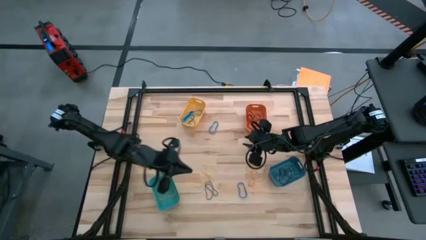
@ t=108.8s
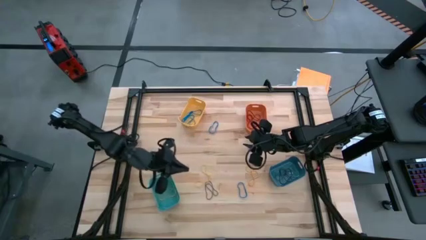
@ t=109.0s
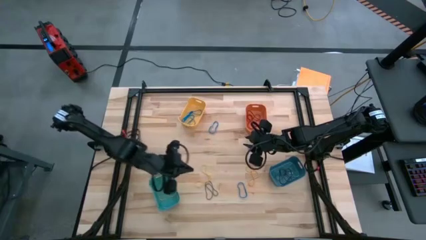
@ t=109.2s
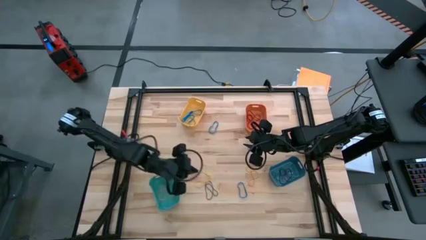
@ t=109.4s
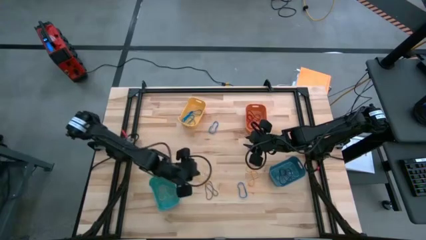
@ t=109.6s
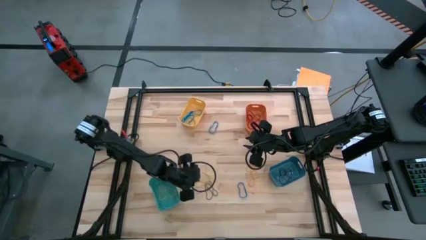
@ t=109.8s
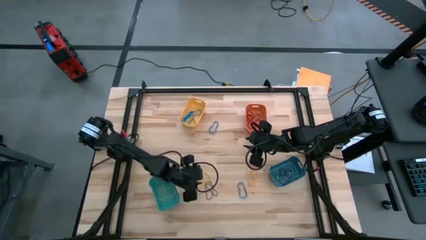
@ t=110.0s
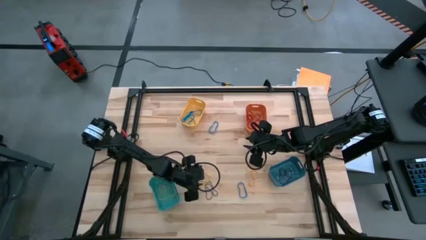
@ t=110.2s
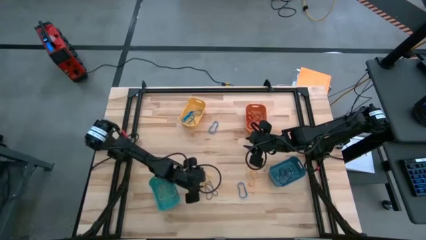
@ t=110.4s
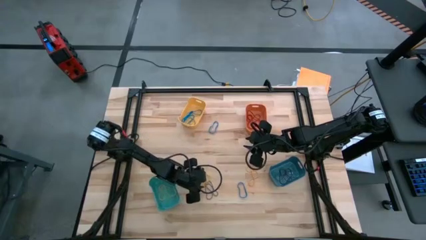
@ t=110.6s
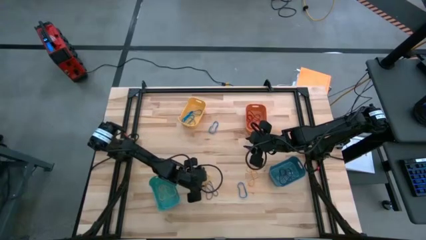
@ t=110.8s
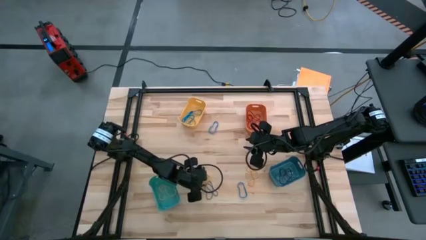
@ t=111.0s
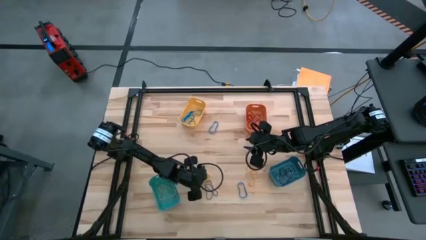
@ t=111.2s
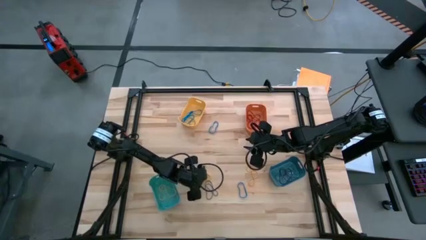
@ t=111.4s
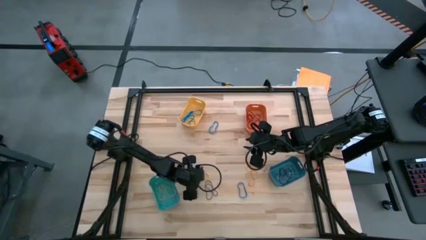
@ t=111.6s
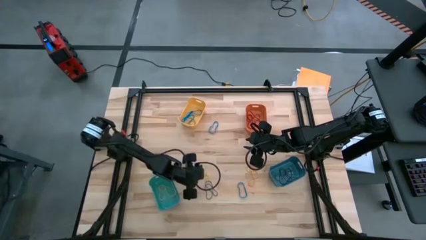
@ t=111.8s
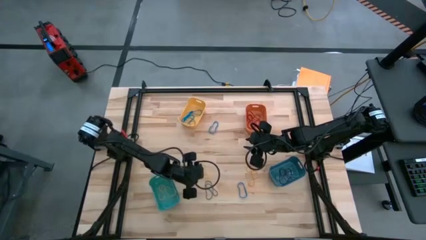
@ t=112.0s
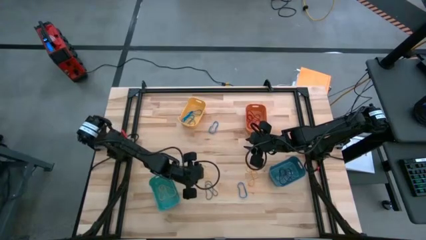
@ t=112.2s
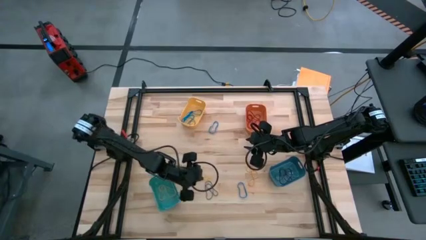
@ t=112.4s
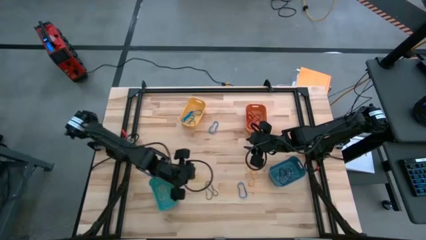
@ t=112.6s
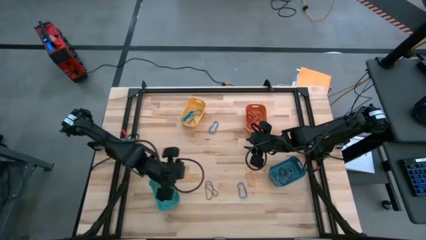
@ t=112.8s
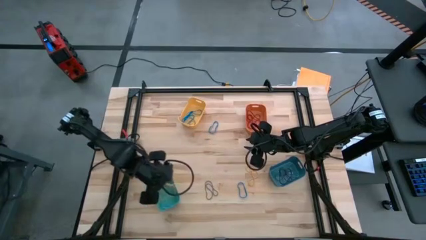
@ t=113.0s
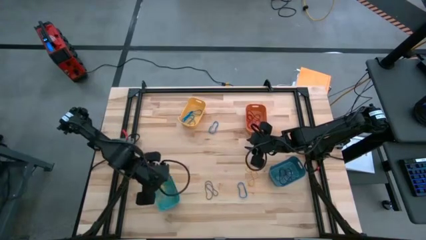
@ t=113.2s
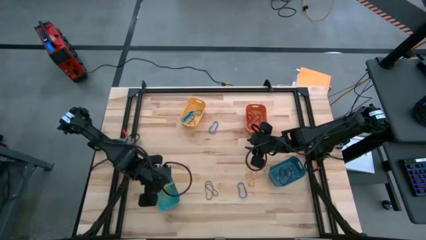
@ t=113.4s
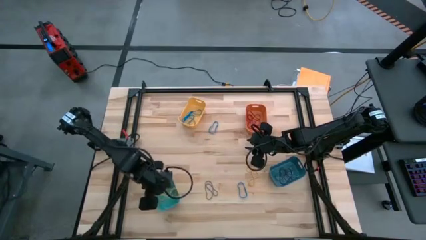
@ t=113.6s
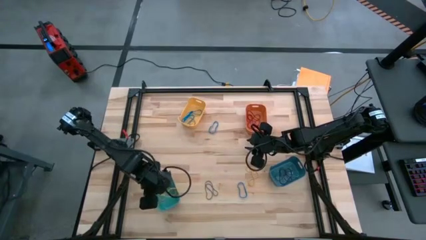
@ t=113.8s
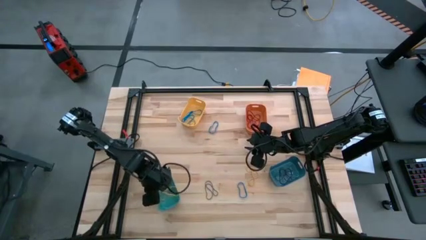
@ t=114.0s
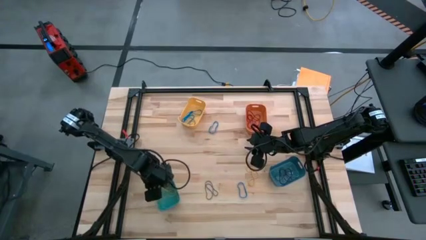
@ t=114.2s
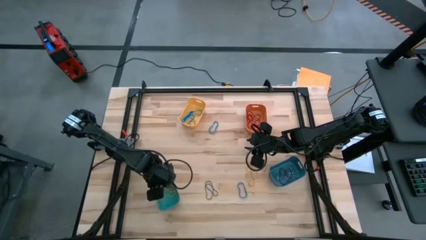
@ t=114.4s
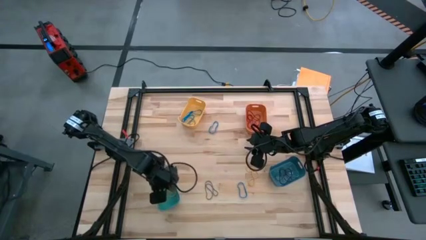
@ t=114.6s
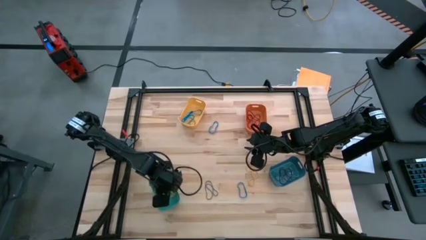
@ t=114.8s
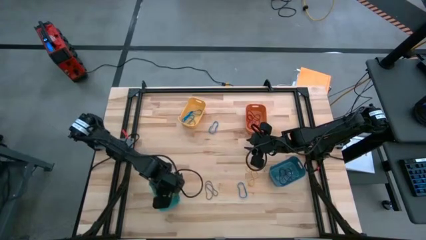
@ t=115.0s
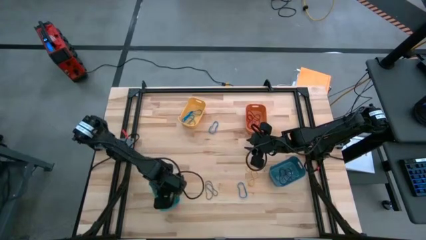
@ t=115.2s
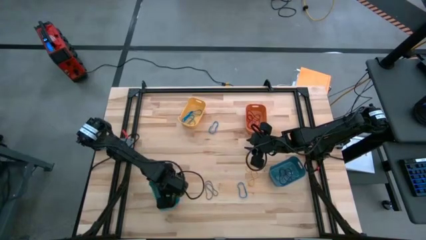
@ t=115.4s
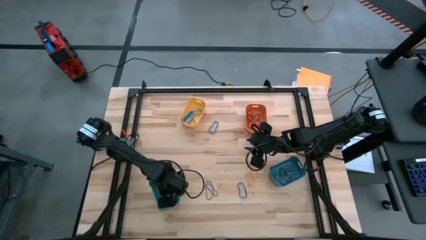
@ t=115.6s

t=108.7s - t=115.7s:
Task: Sort rubber bands into baskets
Put the yellow rubber band into the green bin

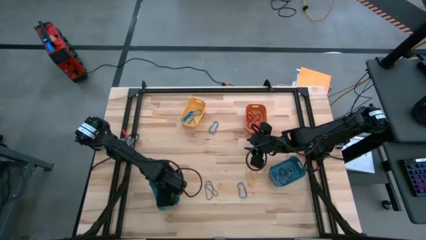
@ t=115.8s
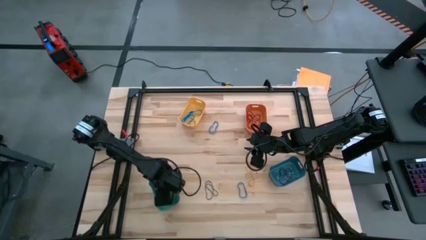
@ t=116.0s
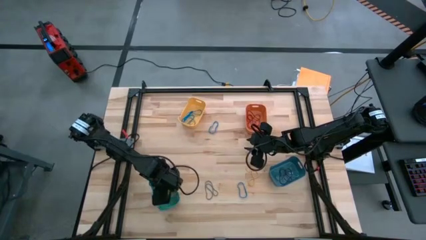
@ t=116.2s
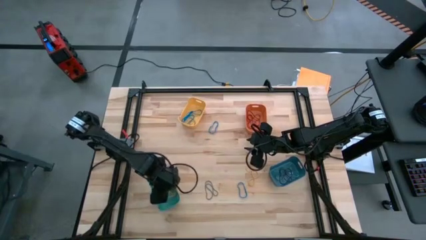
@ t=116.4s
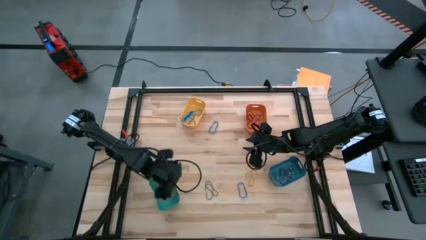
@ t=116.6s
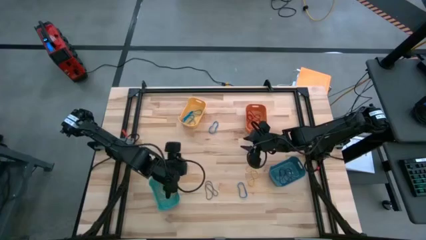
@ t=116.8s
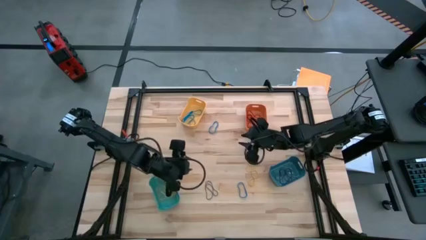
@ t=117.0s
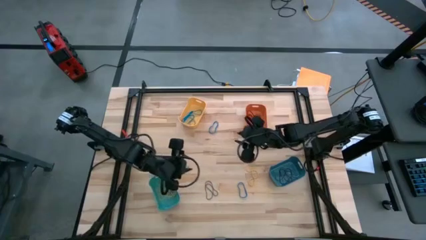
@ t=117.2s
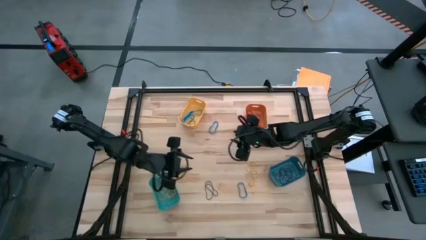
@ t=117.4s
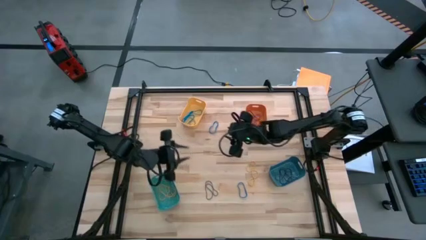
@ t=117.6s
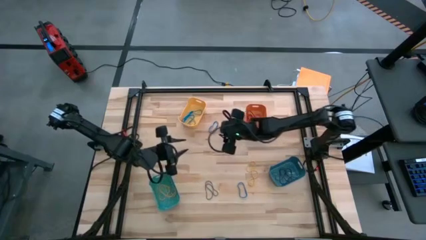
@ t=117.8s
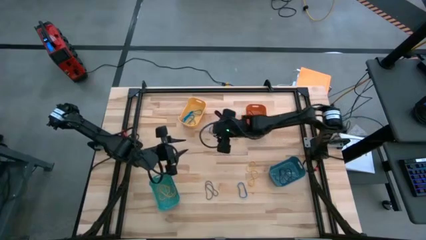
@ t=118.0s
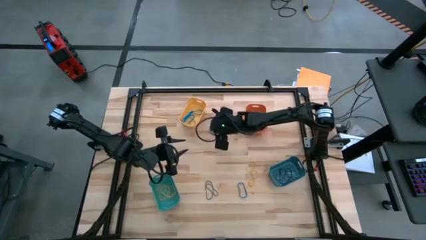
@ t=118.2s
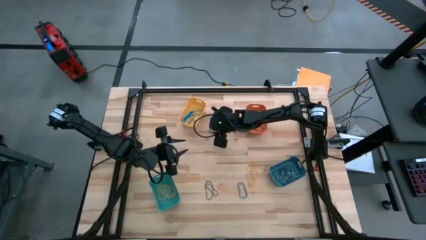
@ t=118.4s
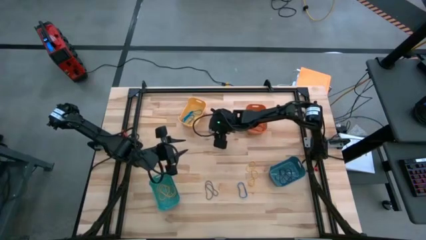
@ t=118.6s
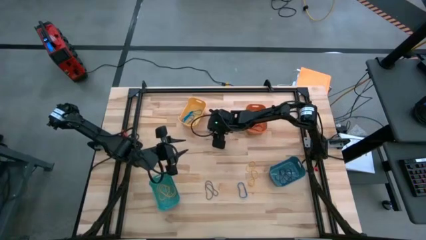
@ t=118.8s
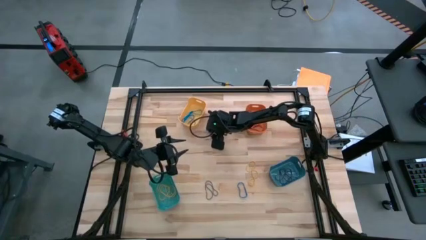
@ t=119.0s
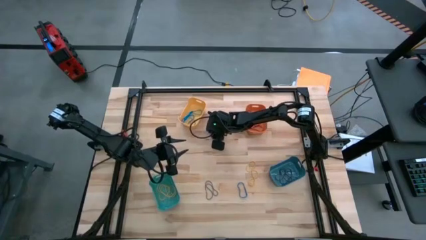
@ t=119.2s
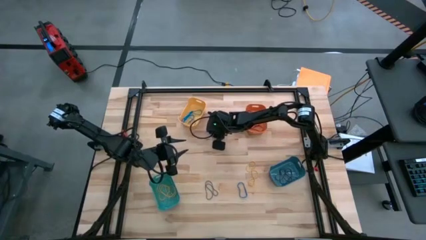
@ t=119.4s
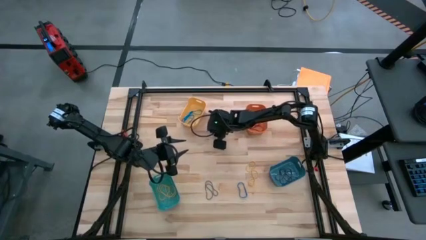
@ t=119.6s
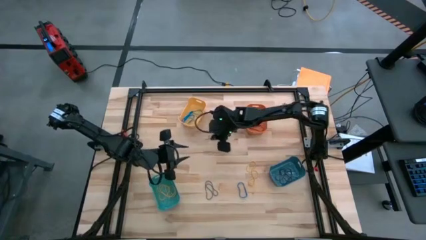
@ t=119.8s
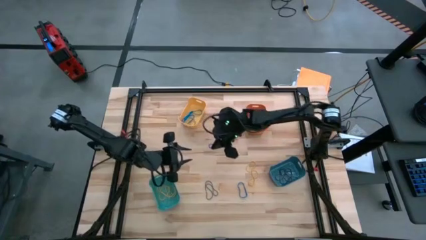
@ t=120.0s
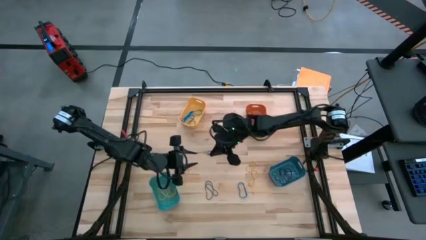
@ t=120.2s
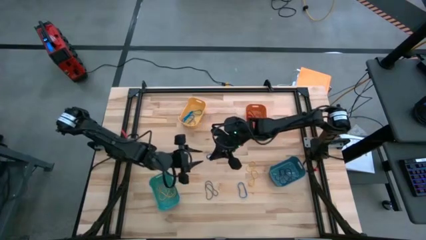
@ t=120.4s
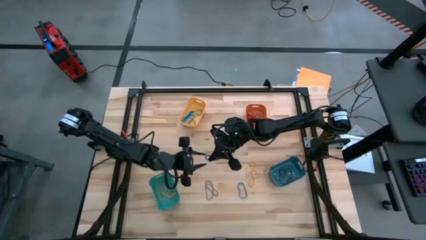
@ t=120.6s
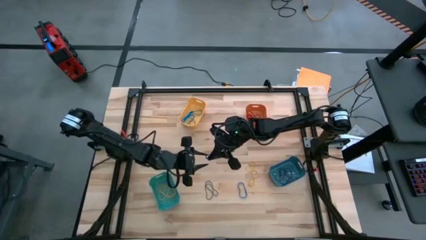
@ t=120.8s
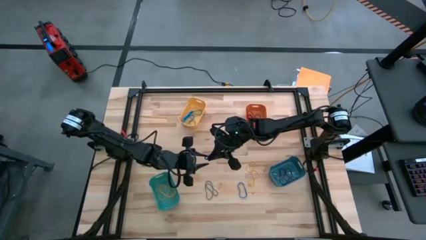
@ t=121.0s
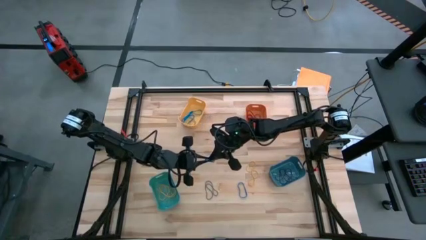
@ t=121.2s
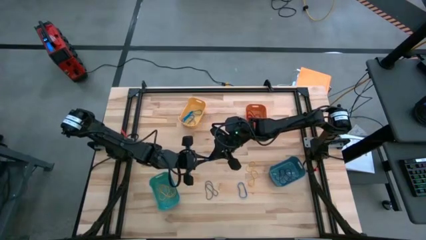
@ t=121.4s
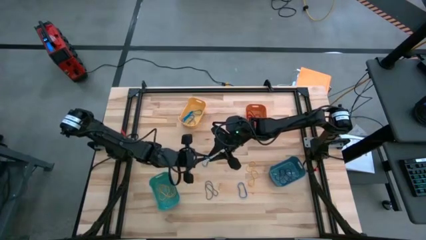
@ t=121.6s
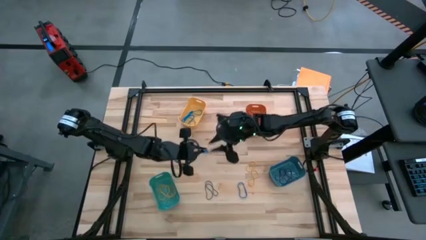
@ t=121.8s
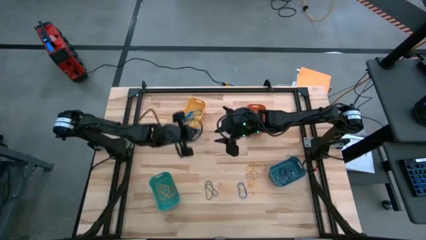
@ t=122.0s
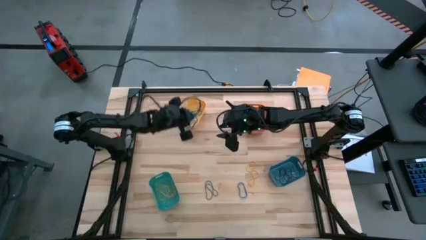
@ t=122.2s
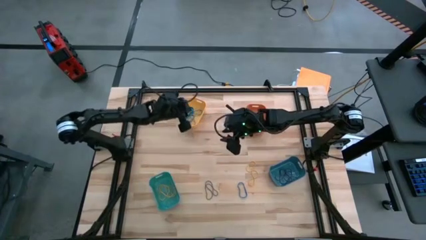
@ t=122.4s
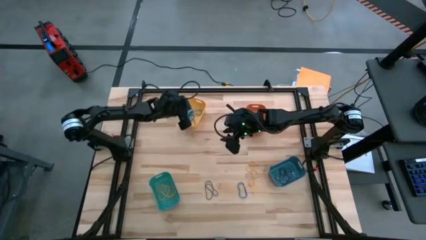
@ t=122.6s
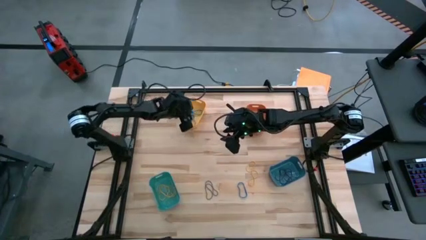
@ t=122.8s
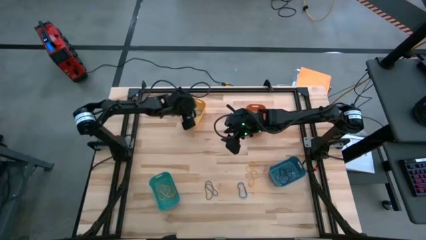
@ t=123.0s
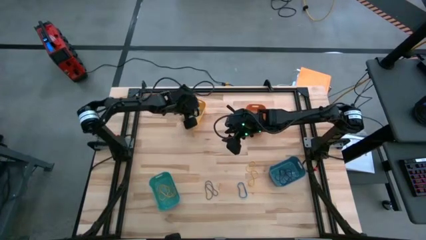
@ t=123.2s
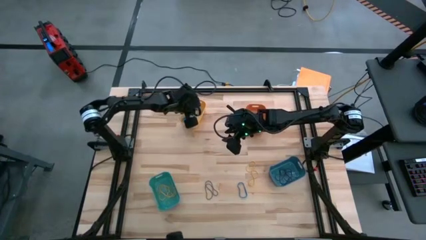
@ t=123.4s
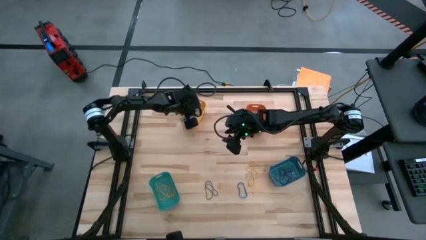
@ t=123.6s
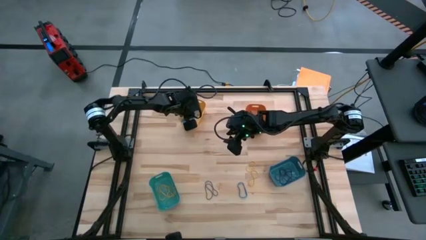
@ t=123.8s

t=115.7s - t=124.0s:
Put the blue rubber band into the yellow bin
